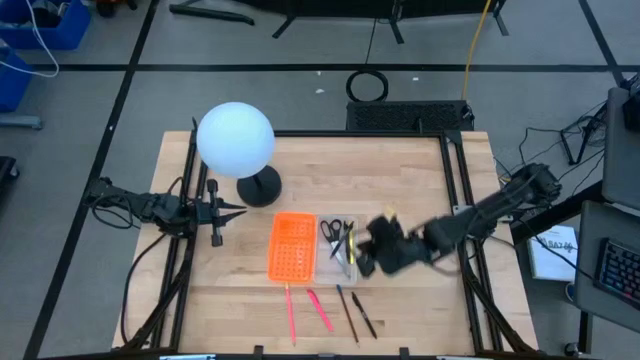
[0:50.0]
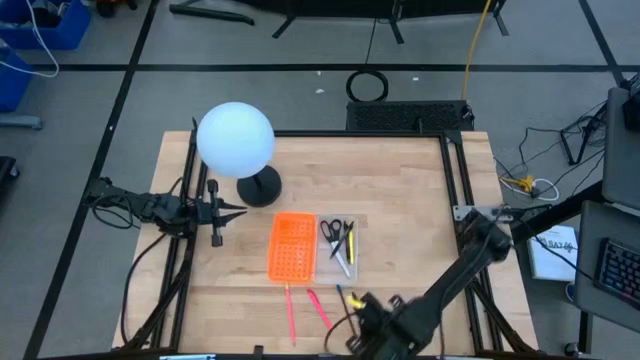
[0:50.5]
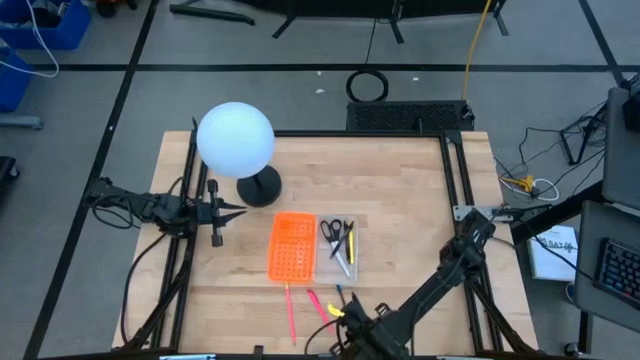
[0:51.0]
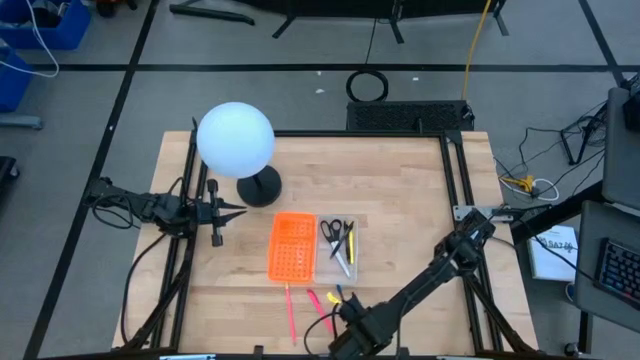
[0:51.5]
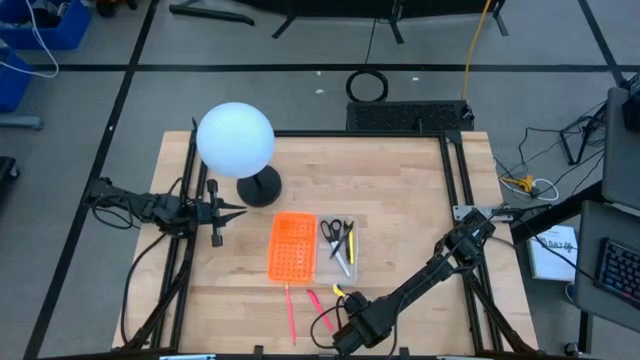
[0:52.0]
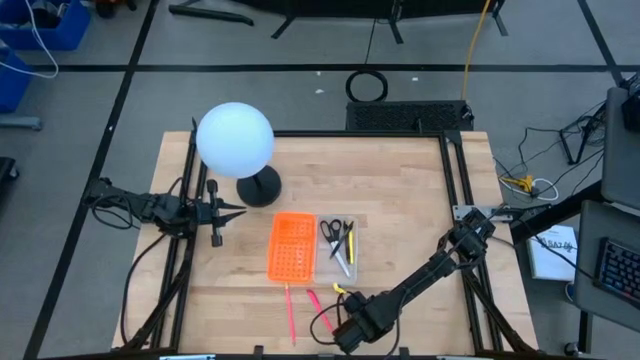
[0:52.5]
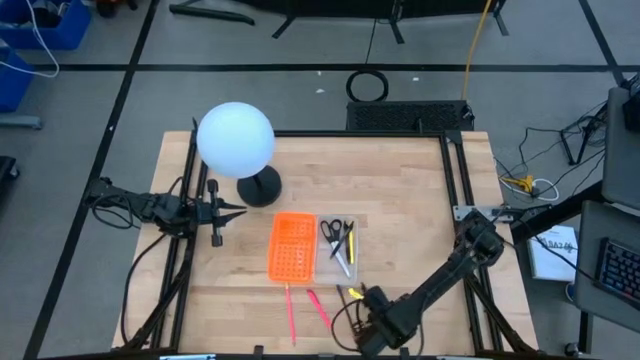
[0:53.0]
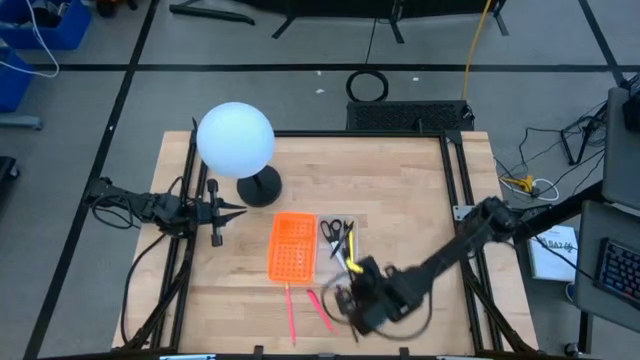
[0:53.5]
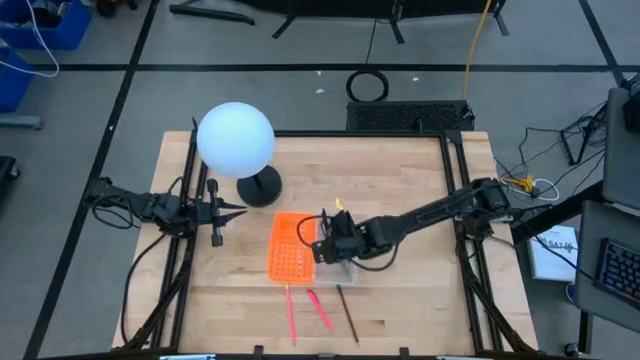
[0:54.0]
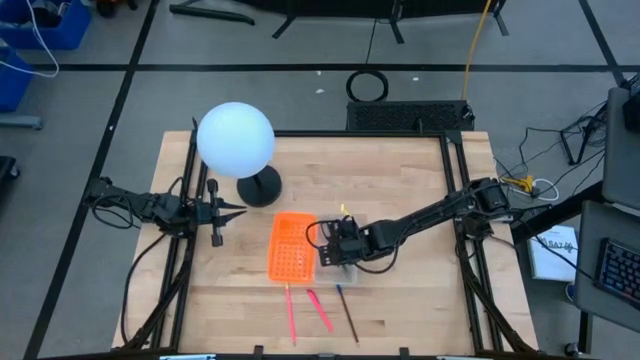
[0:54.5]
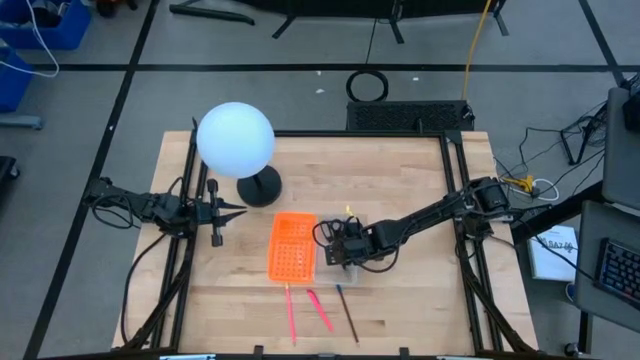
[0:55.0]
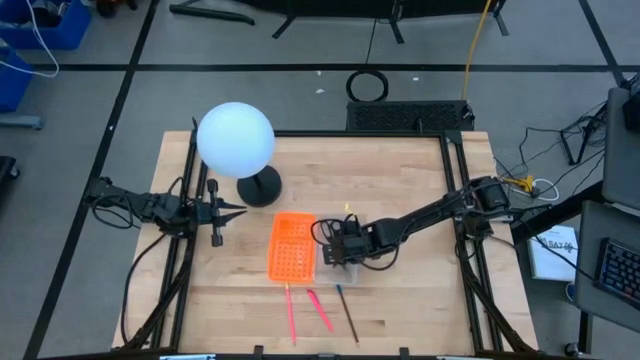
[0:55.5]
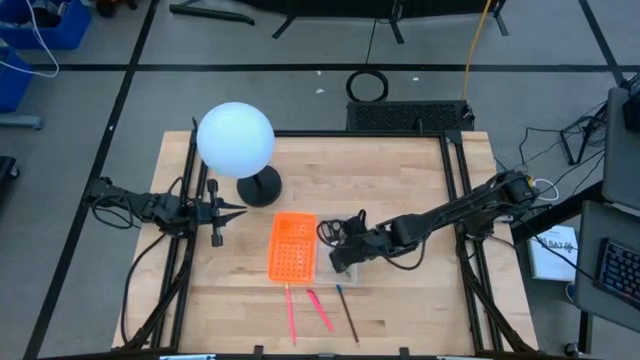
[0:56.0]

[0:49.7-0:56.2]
Task: Pick & place school supplies into a supply box
Put the black pen into the transparent bin

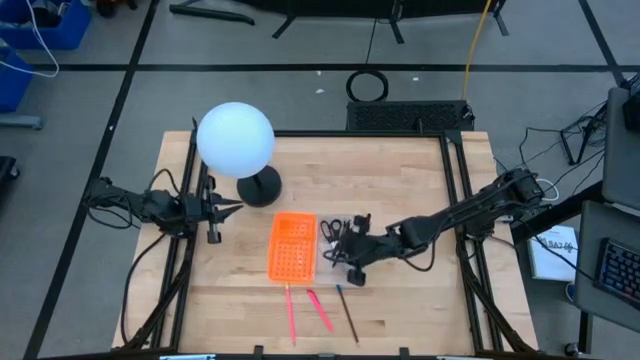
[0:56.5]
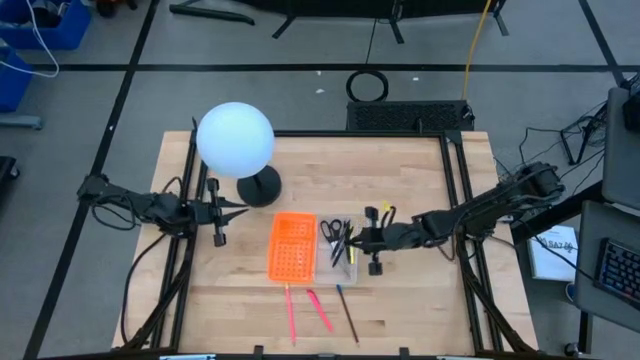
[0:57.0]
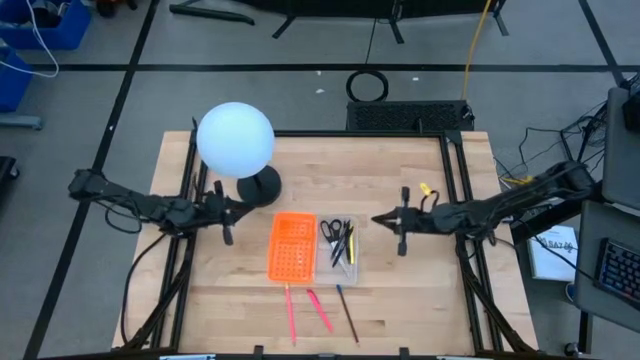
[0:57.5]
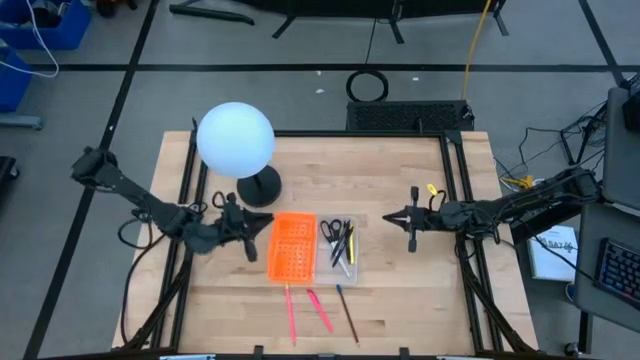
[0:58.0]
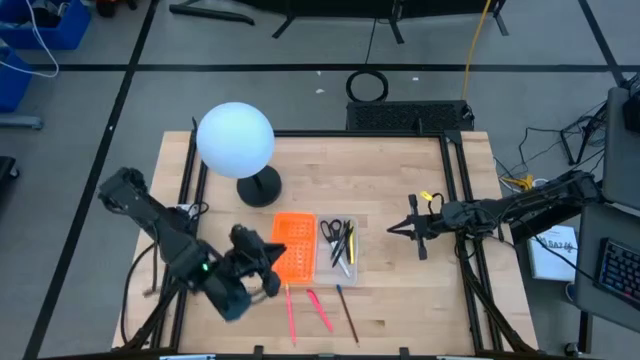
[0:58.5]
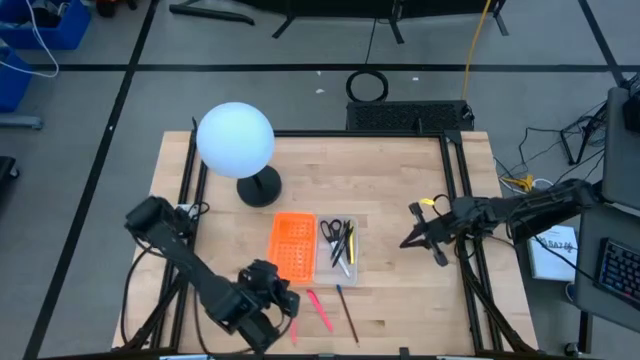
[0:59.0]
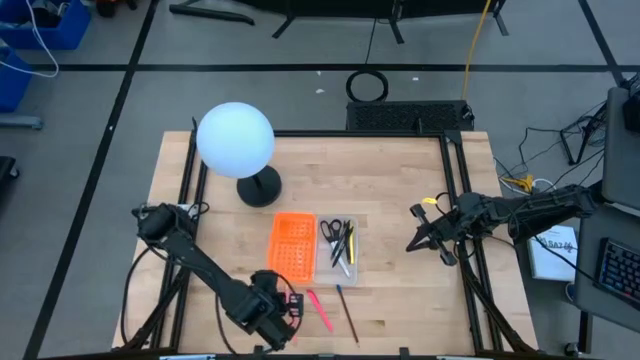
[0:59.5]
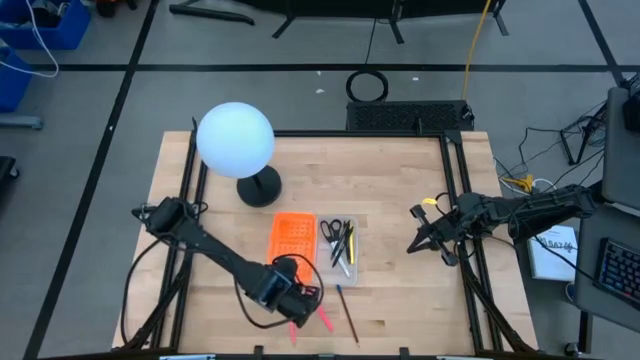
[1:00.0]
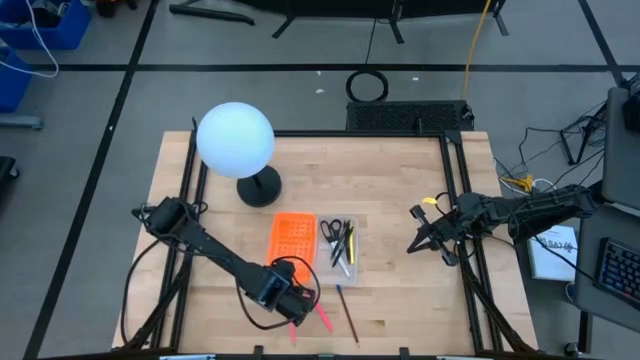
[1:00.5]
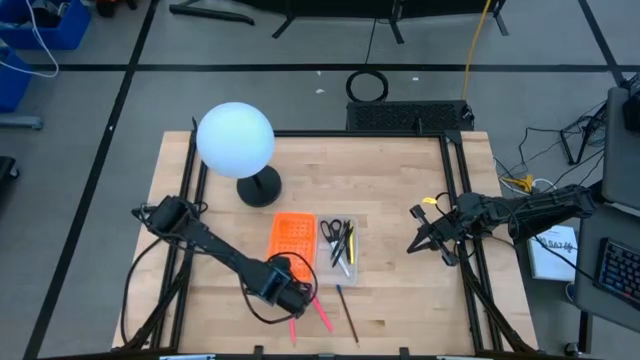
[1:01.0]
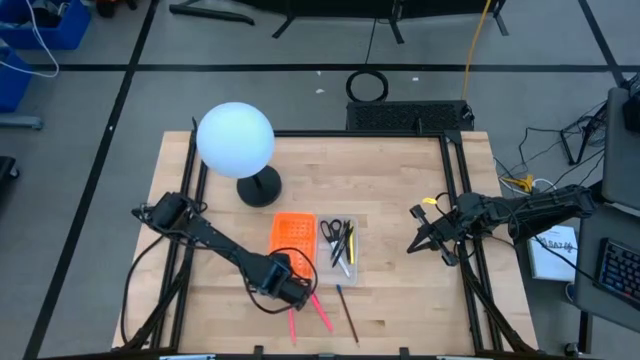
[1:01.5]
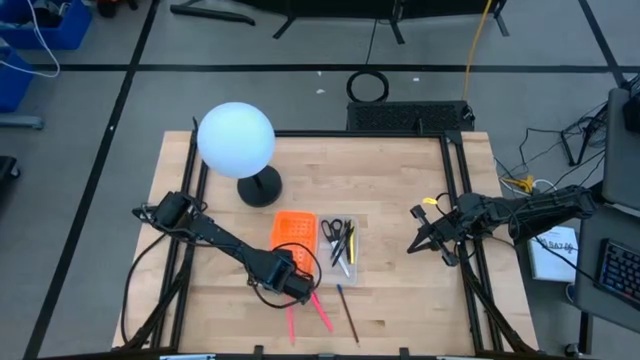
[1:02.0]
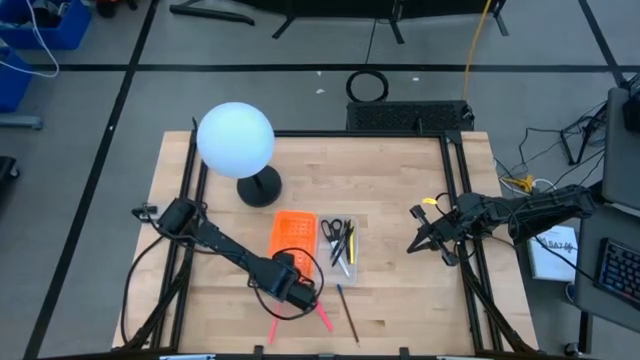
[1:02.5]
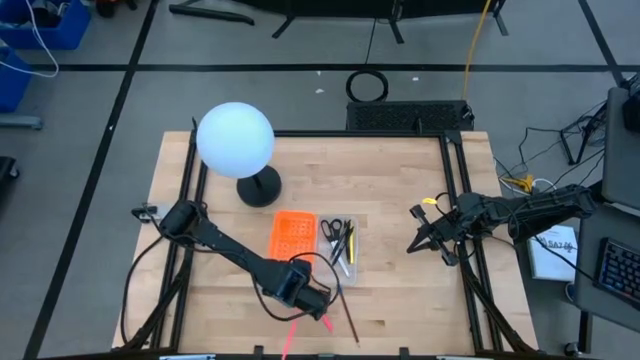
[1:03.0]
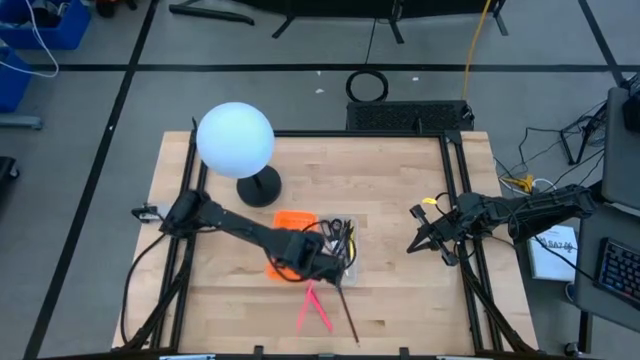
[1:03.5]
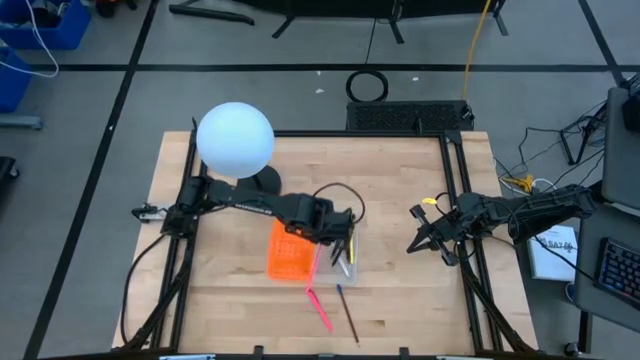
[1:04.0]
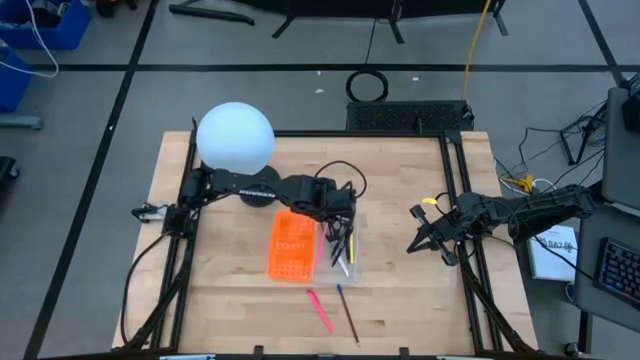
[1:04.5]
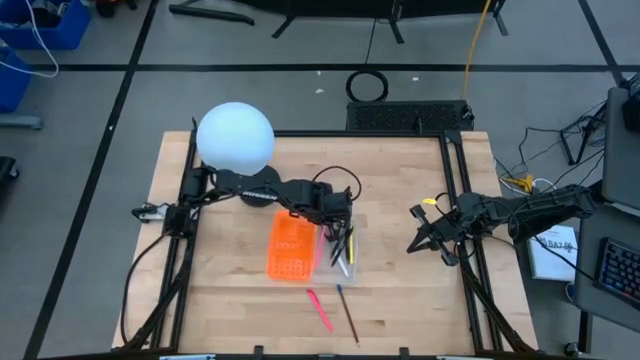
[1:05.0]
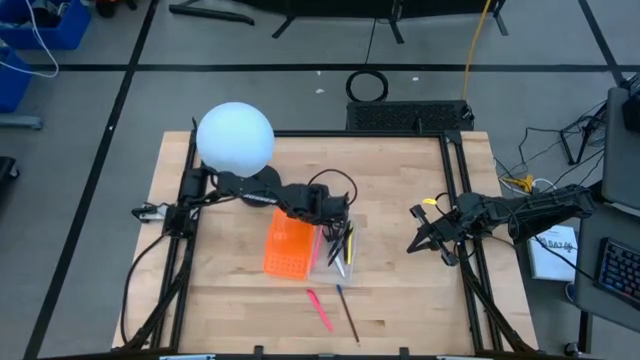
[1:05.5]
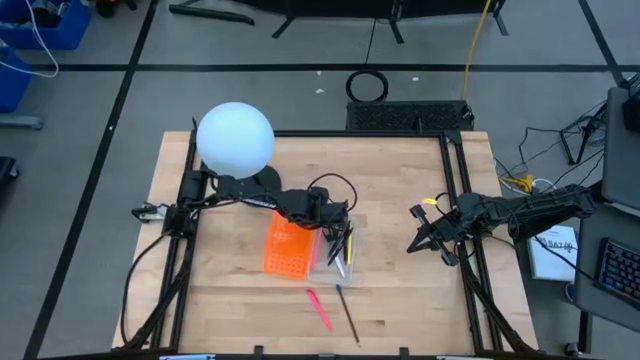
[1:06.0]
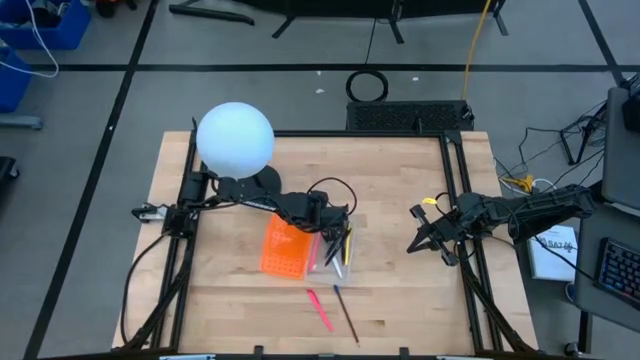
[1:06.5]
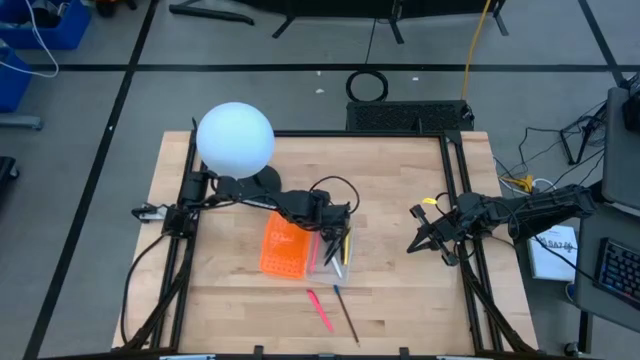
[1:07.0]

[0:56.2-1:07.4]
Put the pink pencil into the transparent bin

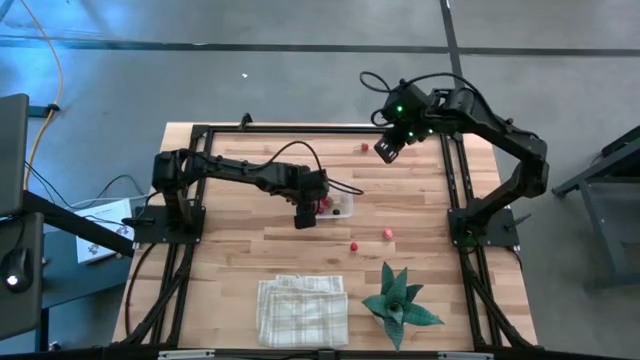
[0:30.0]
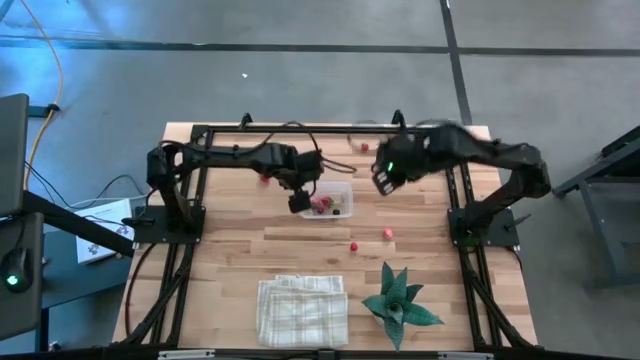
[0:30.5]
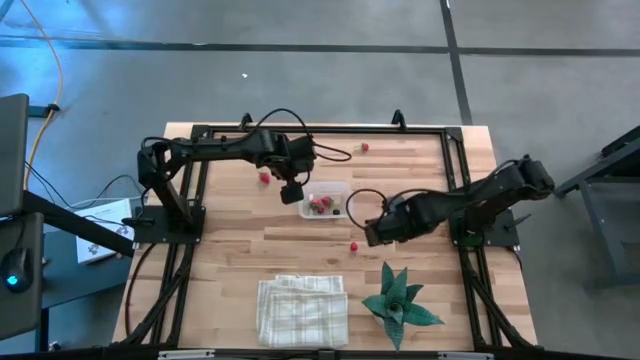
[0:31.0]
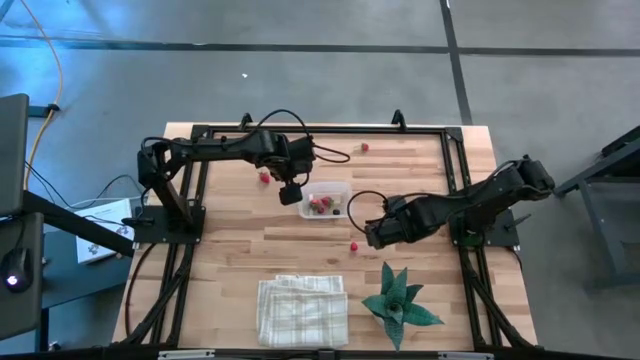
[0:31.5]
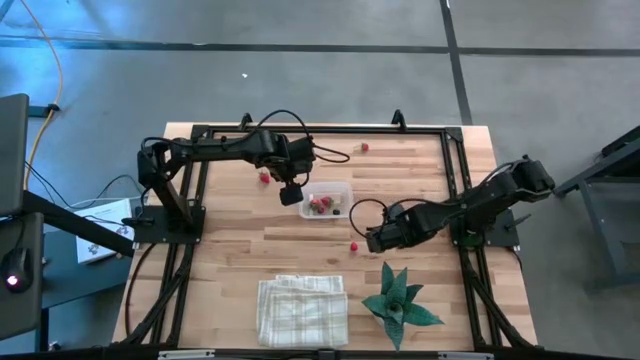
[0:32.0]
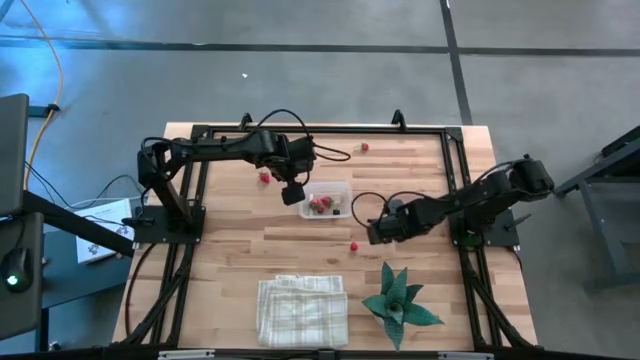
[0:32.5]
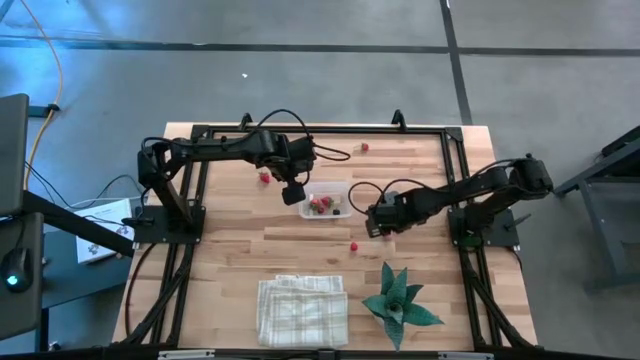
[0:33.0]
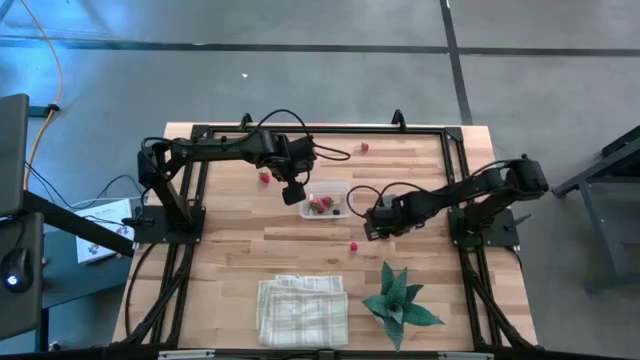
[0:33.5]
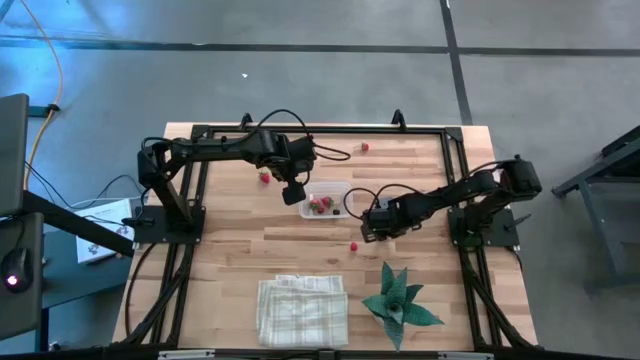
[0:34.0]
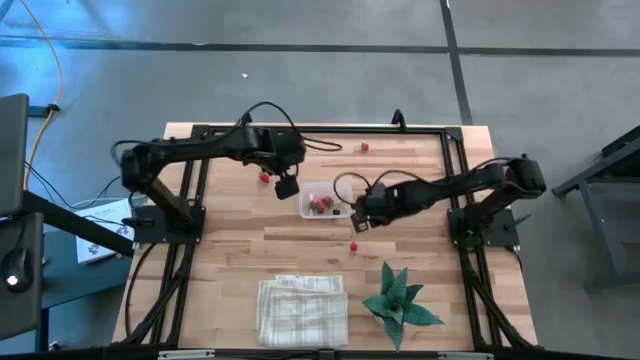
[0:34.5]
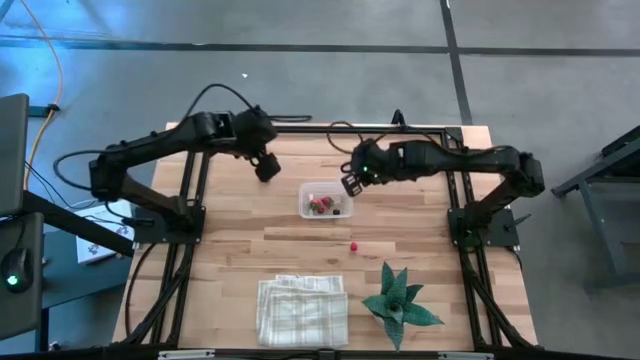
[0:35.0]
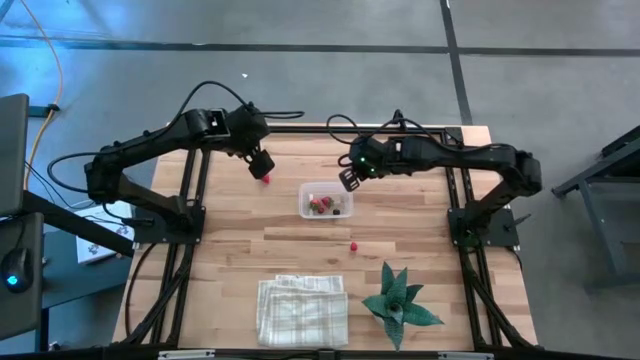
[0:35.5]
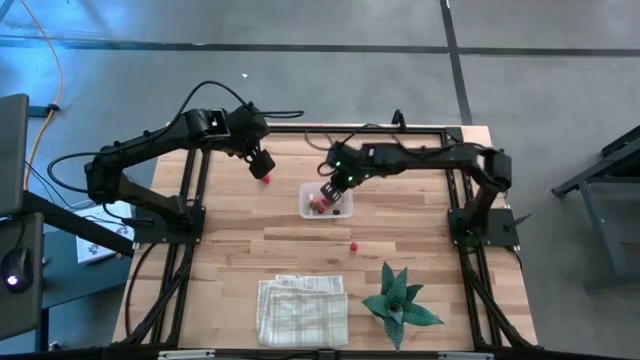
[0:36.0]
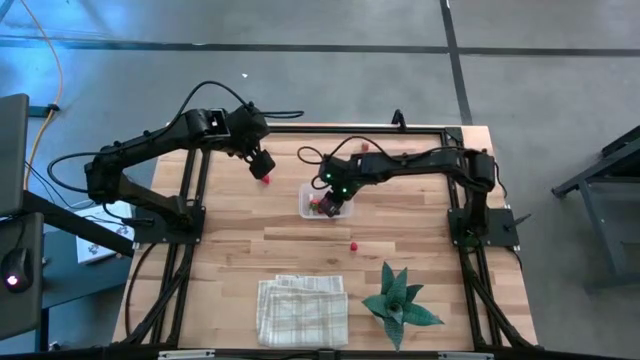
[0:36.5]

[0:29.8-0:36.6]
Task: Pick and placing Produce into tupperware
Put the pink apricot into the transparent bin
